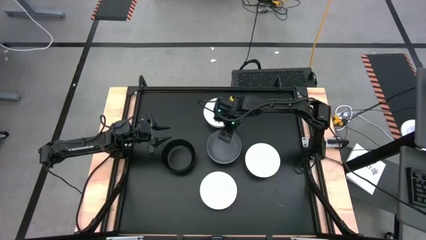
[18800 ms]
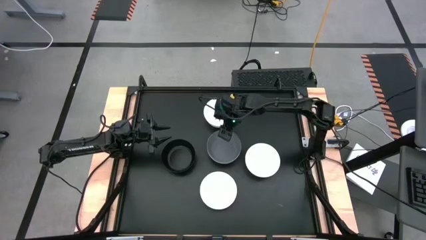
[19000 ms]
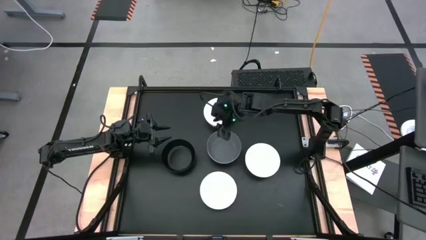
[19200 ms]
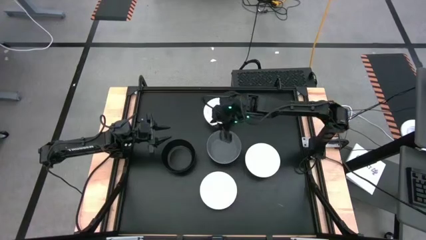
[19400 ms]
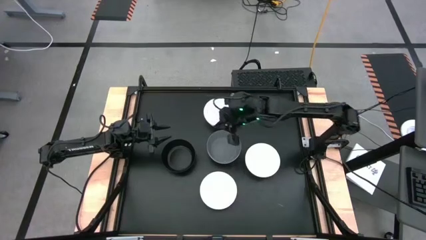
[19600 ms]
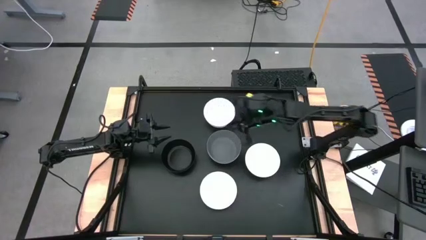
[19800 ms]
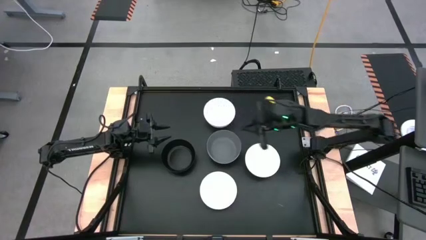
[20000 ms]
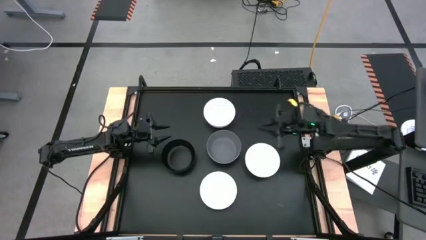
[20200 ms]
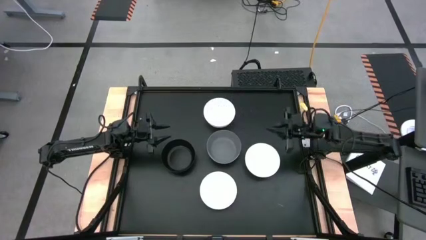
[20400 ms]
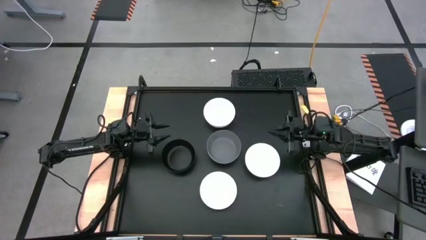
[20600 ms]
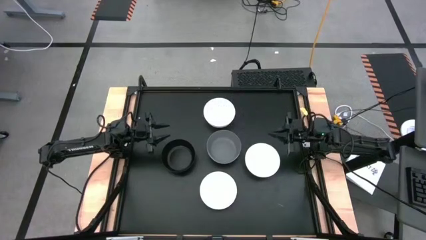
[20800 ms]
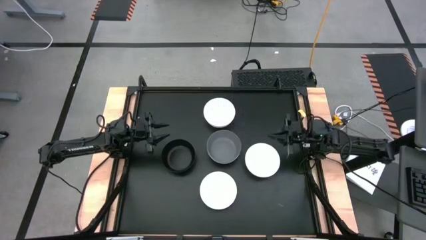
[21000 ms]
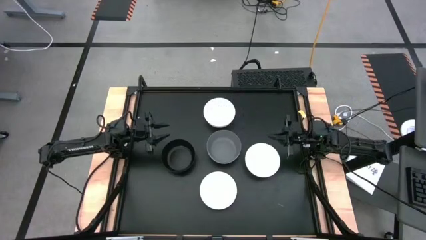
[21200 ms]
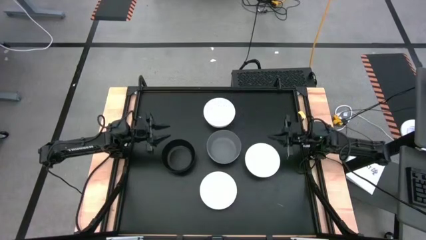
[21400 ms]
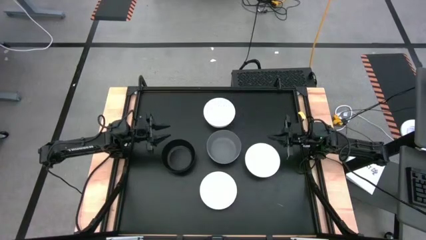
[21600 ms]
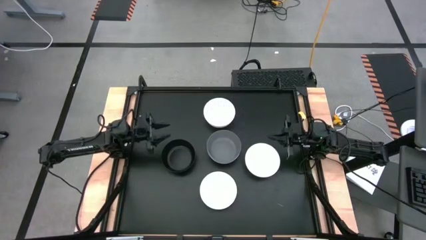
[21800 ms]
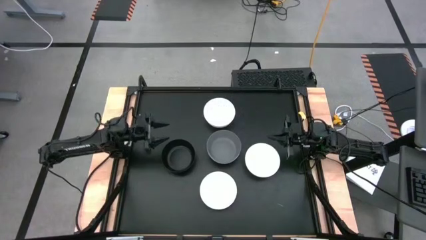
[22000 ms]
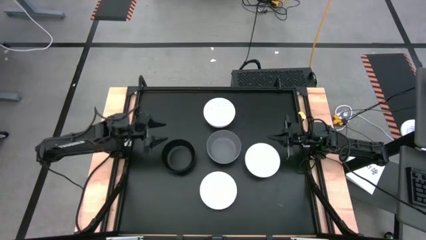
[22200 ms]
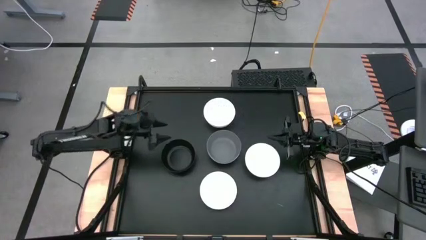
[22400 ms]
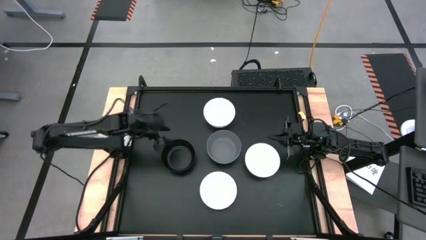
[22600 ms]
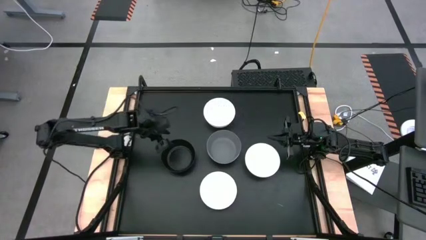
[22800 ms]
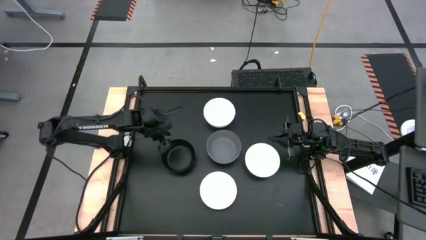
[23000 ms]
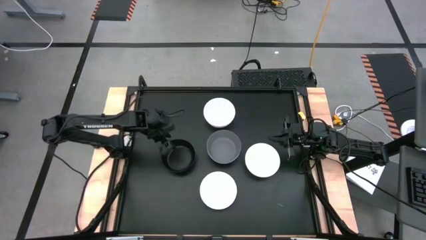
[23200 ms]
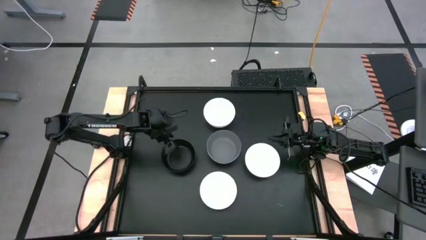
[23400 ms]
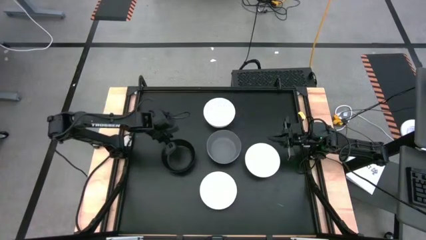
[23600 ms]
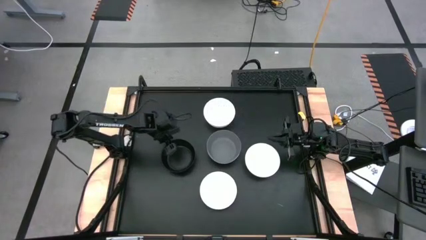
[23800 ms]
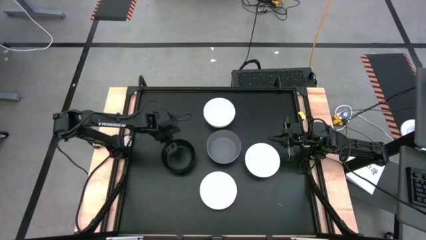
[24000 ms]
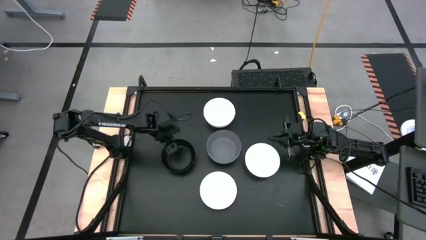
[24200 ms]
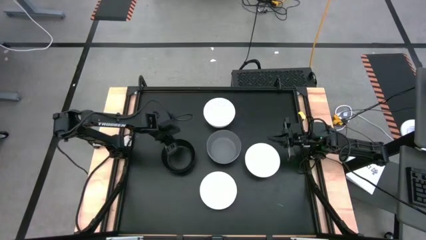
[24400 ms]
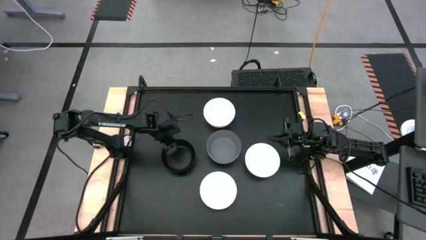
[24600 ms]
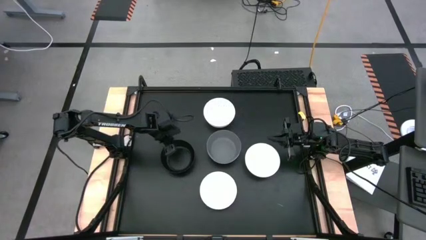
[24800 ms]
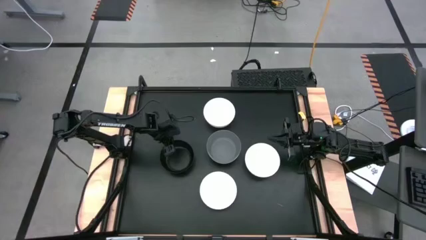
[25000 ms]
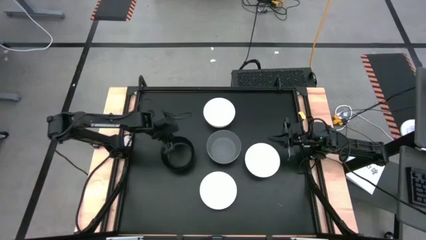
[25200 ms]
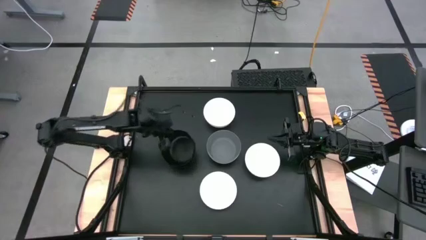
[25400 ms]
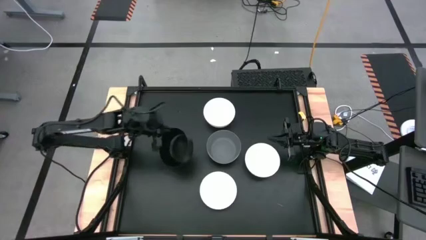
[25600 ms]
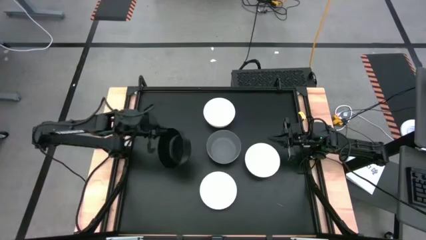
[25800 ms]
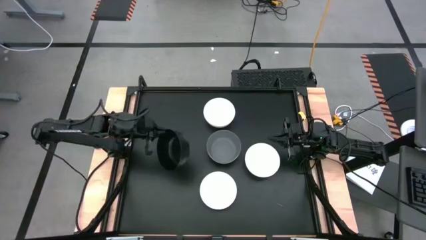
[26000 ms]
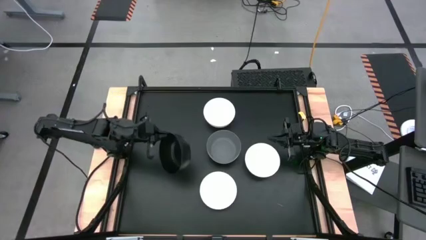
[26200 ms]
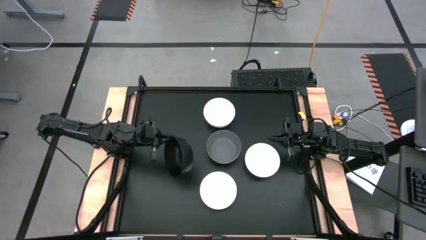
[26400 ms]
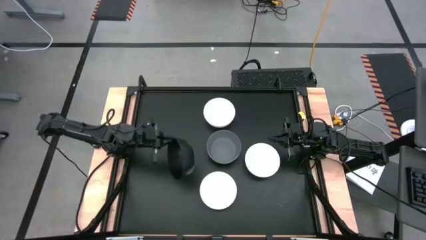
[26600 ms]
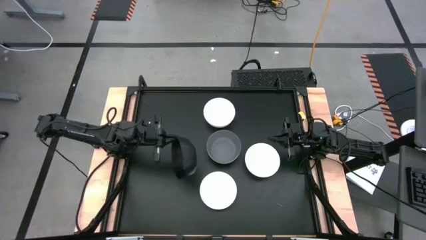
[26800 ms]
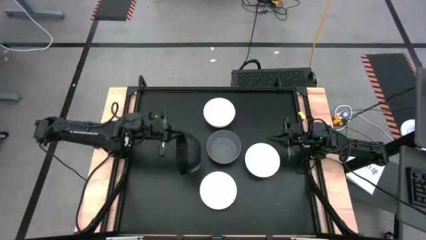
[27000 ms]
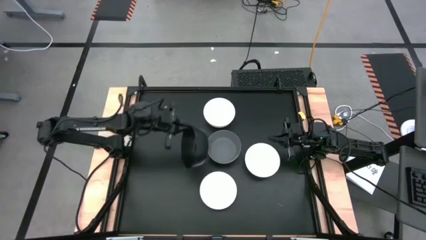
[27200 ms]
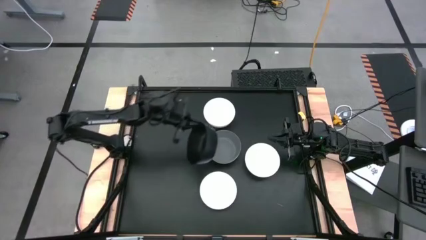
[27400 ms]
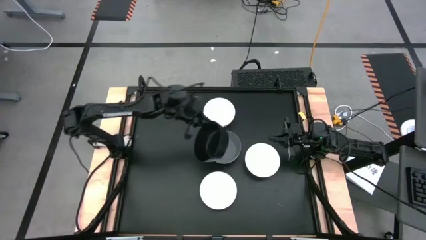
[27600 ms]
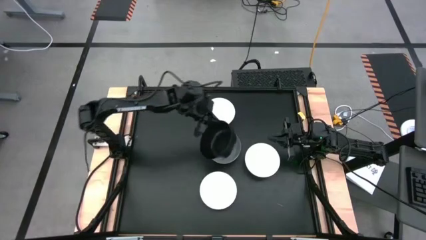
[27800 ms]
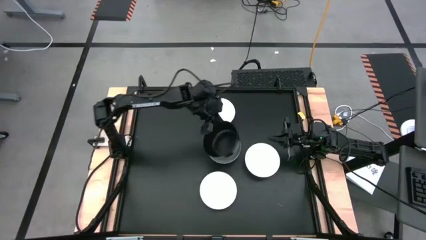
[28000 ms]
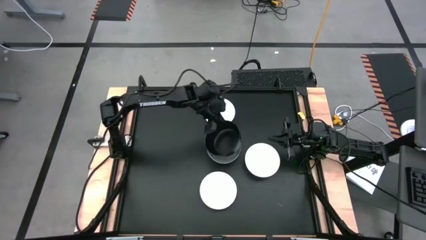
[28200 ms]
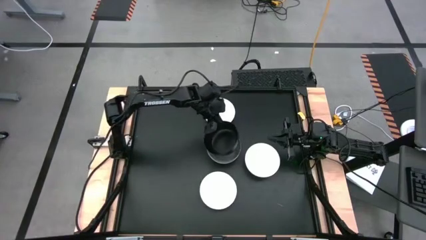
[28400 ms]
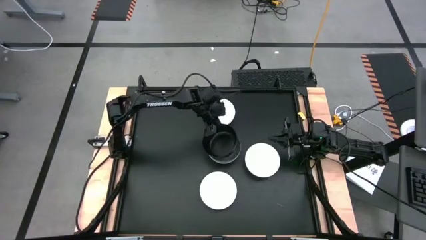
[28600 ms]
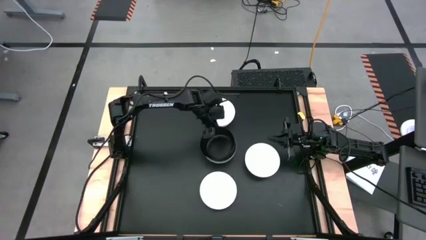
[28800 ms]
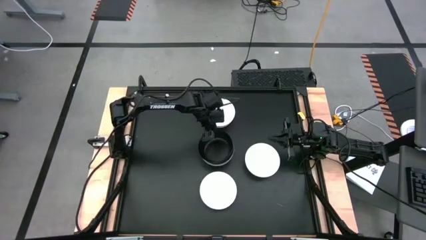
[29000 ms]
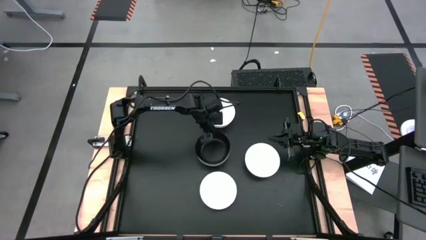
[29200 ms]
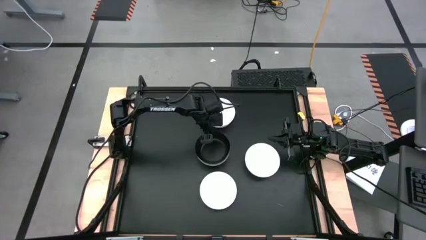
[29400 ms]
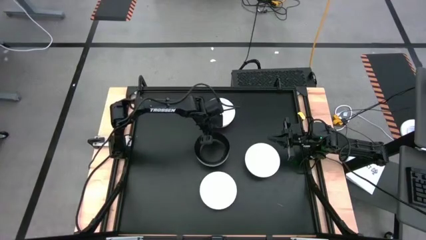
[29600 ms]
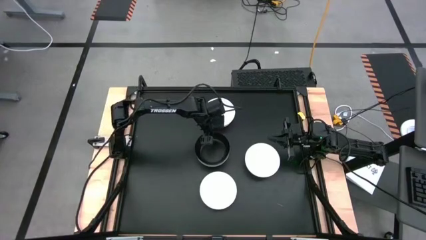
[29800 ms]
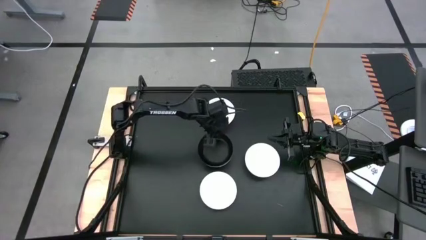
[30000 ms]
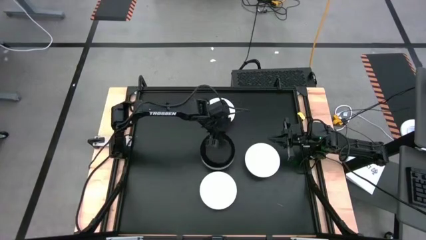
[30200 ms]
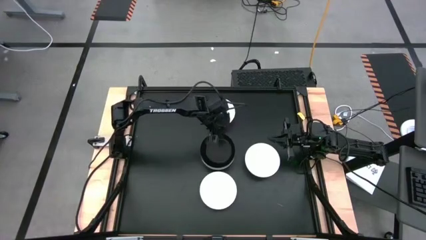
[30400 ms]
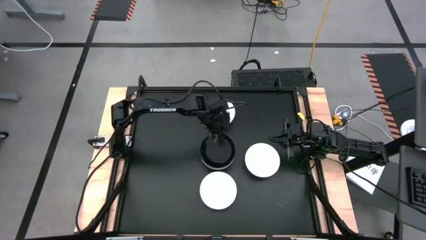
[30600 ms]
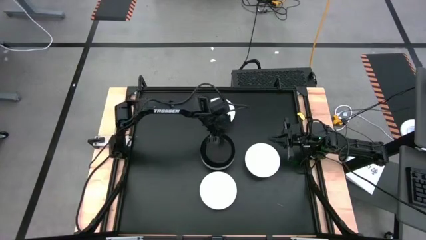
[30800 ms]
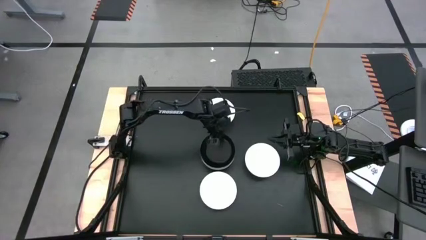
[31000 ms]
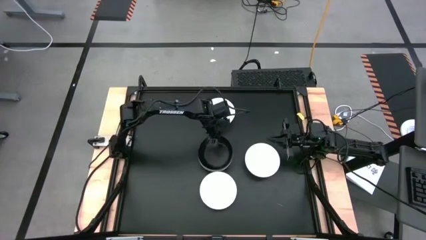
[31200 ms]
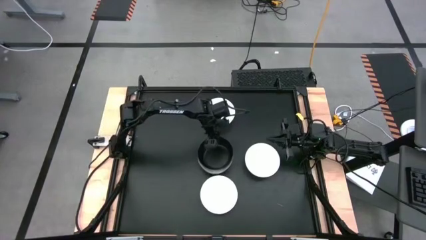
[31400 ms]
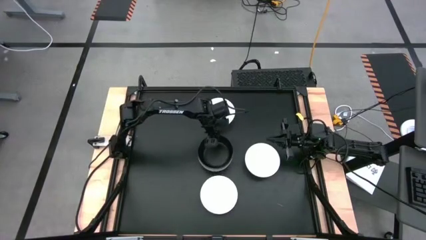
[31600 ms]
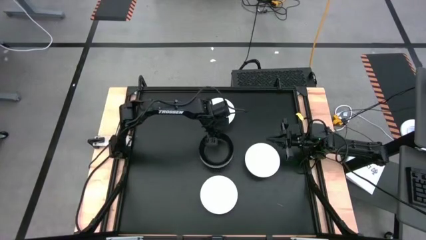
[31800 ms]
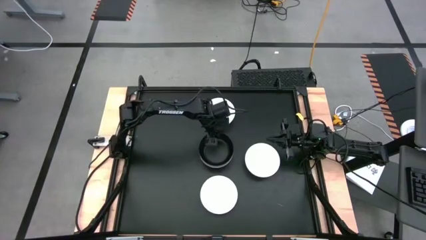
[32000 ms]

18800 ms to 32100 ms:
Task: Nest bowls inside each other
Stack the black bowl on top of the gray bowl
